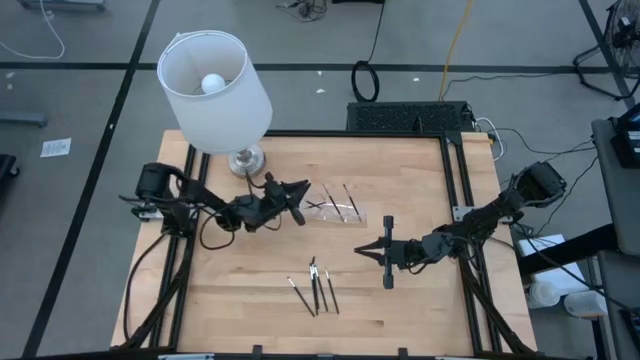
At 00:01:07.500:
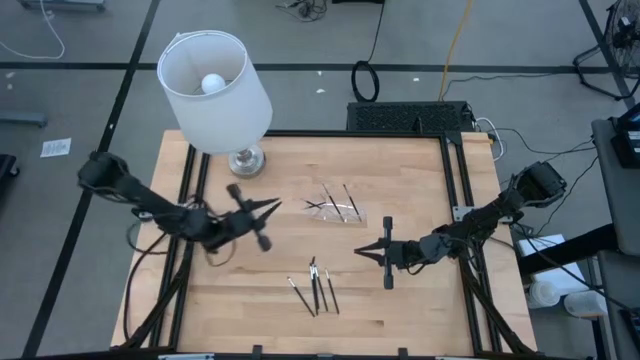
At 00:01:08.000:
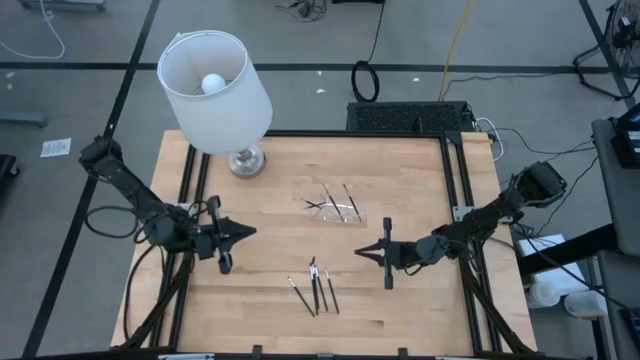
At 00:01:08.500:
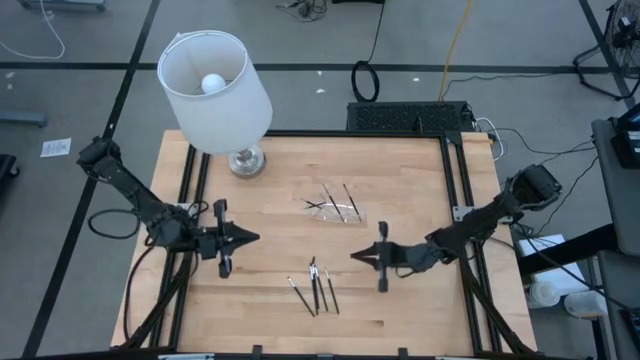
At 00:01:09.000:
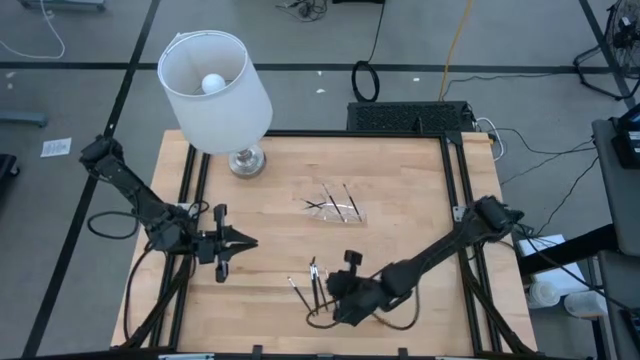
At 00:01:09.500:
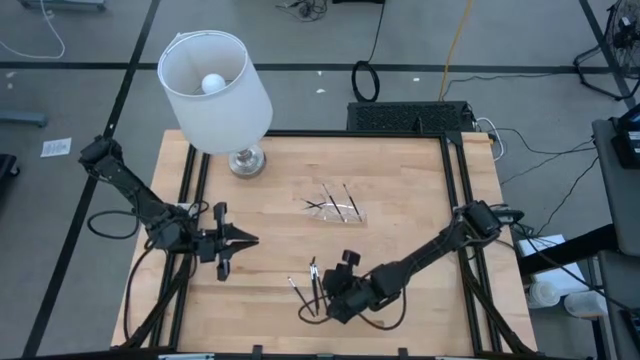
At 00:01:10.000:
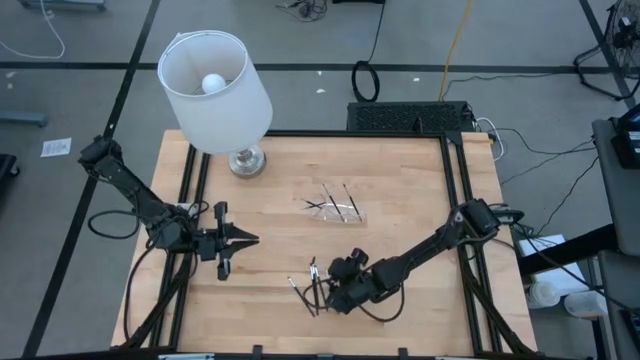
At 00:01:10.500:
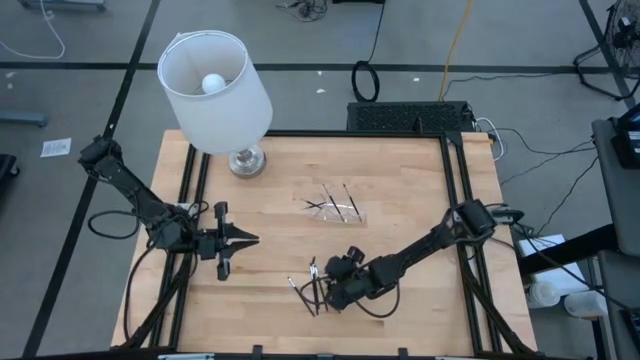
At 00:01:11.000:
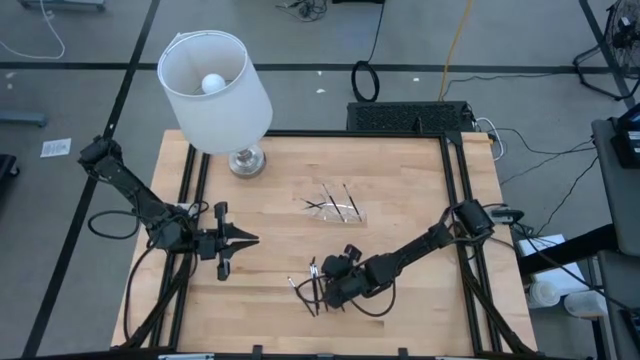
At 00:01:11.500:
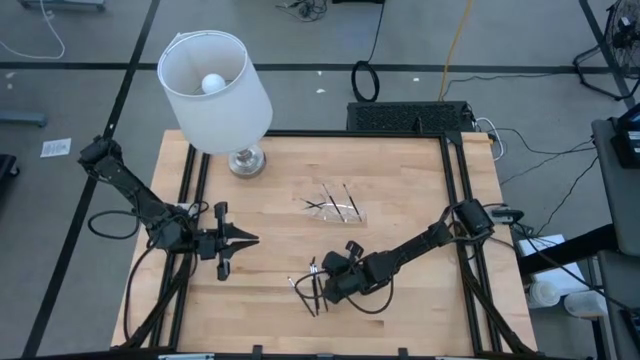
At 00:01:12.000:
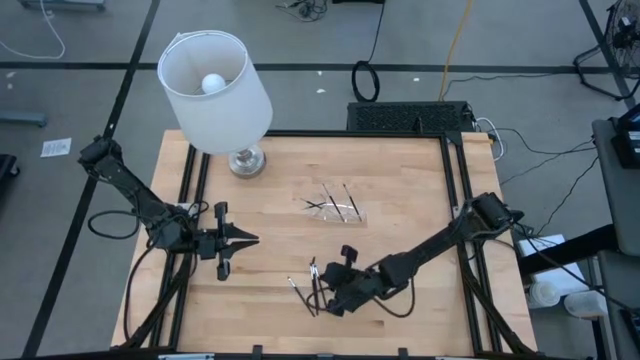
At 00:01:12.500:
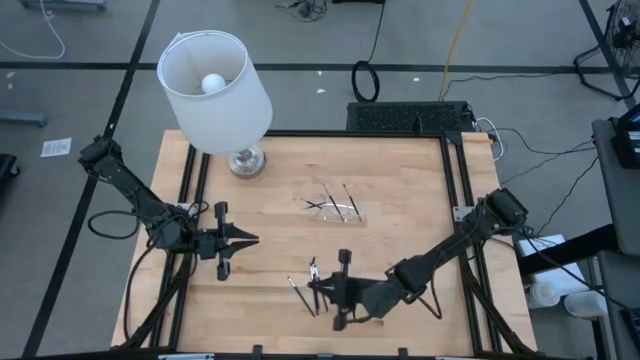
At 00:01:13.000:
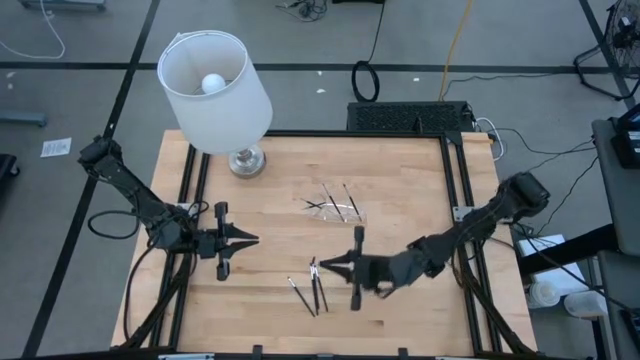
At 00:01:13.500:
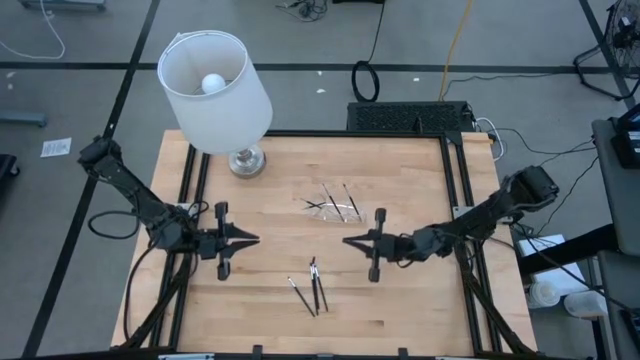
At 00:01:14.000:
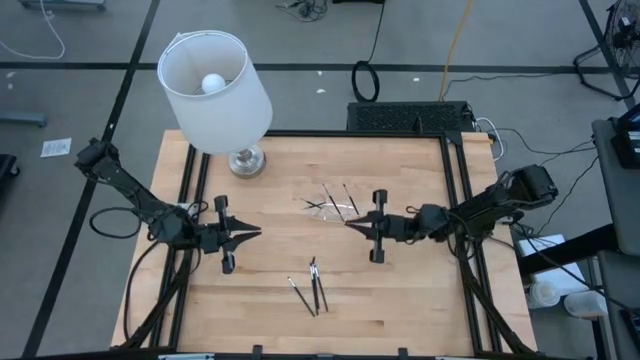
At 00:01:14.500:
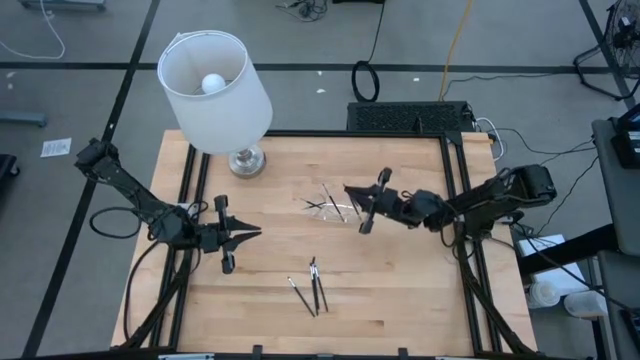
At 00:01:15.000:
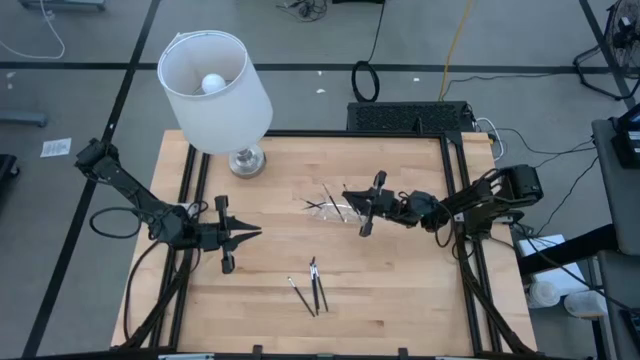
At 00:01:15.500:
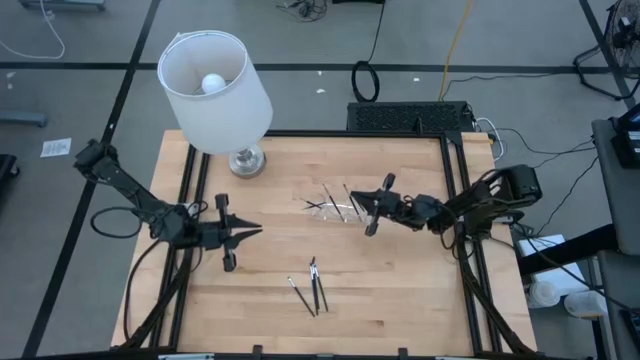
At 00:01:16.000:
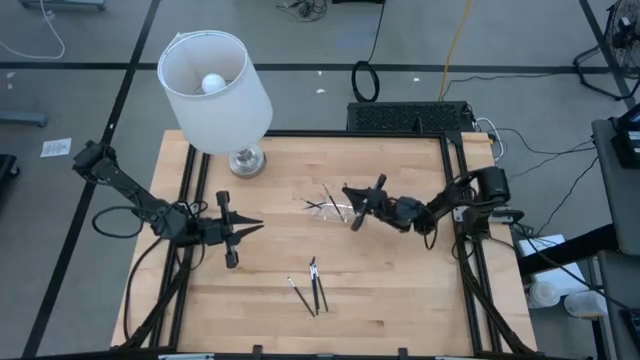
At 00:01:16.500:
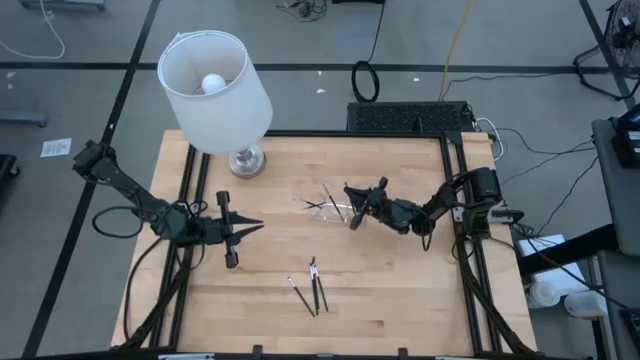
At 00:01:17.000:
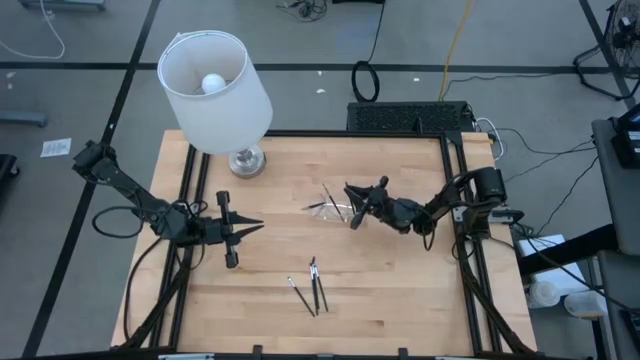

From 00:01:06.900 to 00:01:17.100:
Task: Put items in baskets/containers
Put the liner brush into the transparent organizer

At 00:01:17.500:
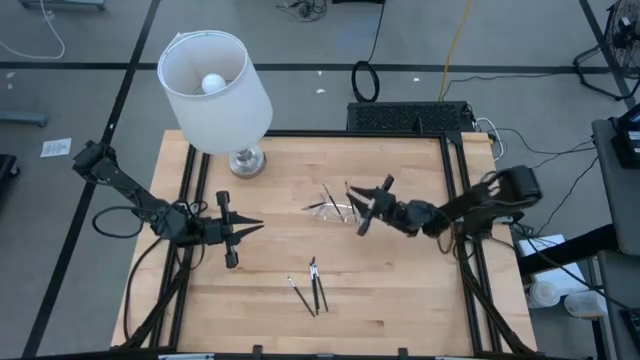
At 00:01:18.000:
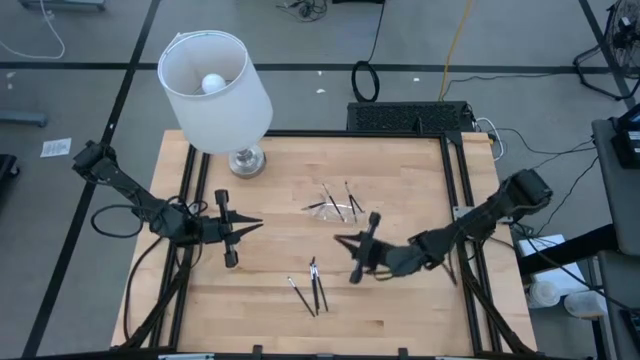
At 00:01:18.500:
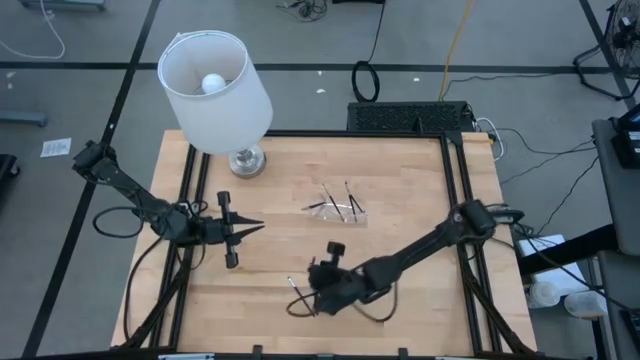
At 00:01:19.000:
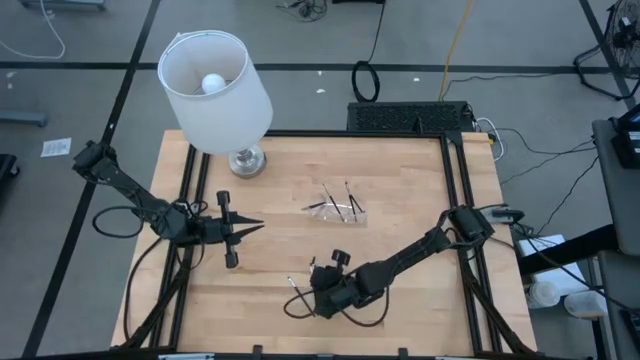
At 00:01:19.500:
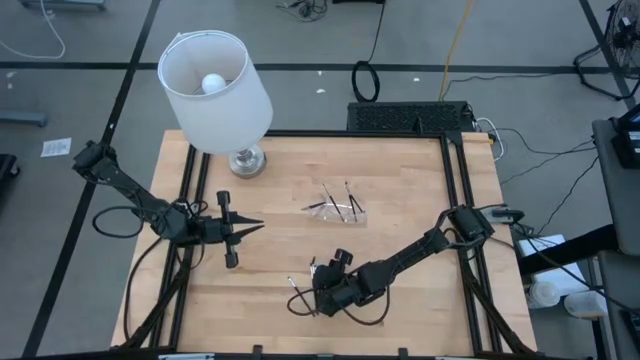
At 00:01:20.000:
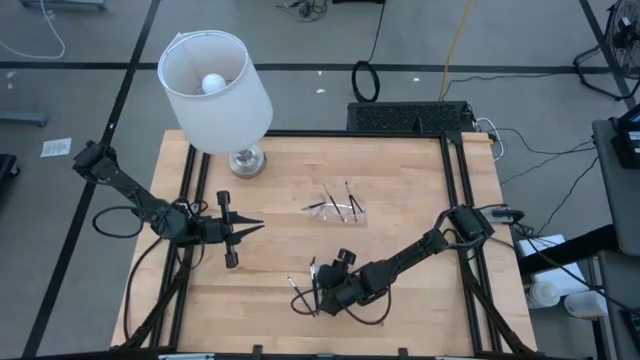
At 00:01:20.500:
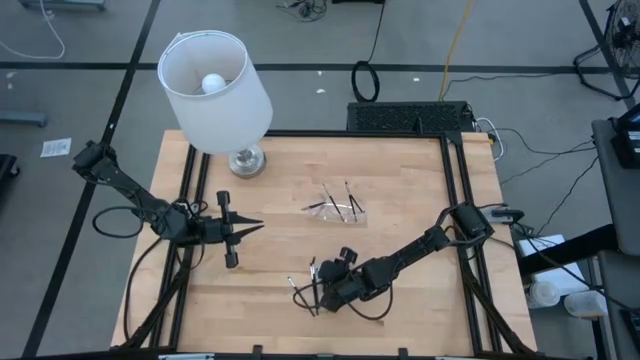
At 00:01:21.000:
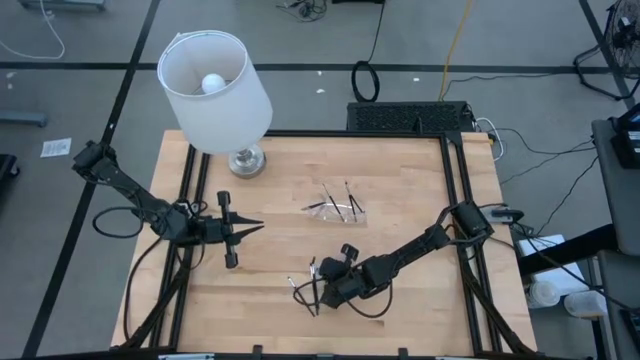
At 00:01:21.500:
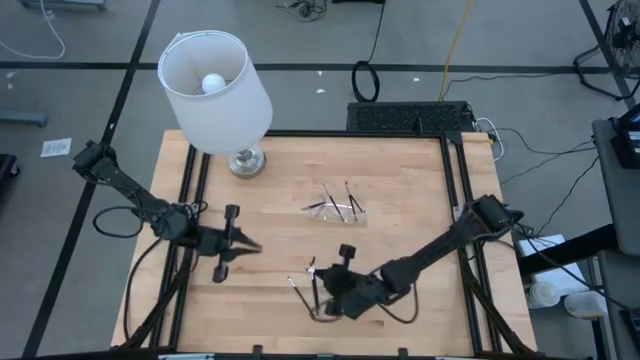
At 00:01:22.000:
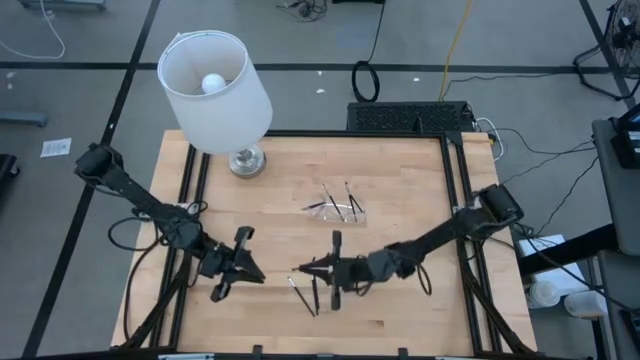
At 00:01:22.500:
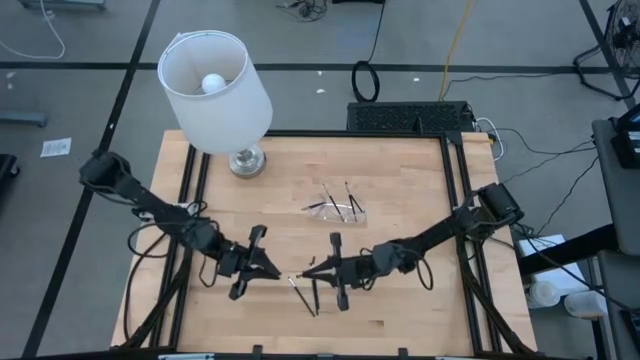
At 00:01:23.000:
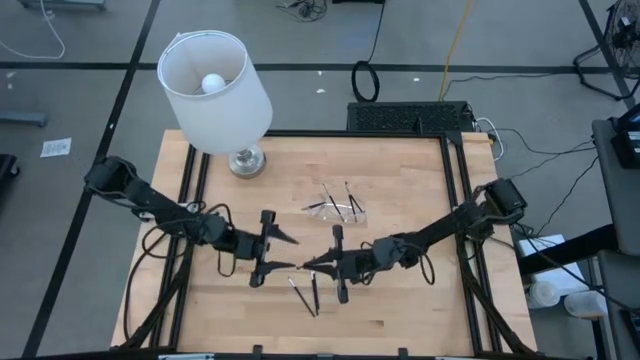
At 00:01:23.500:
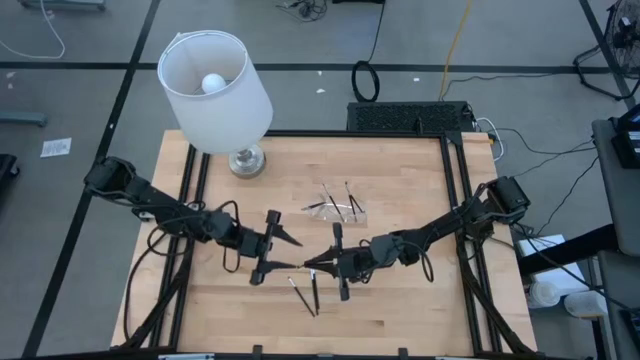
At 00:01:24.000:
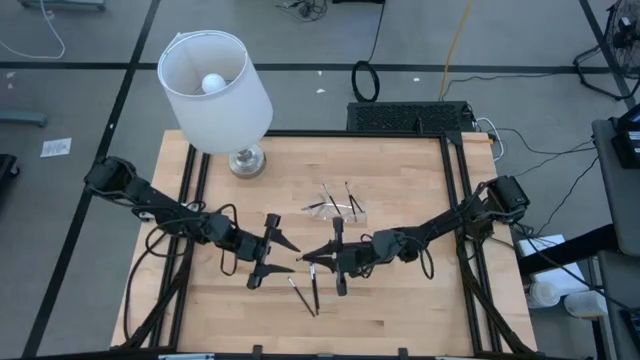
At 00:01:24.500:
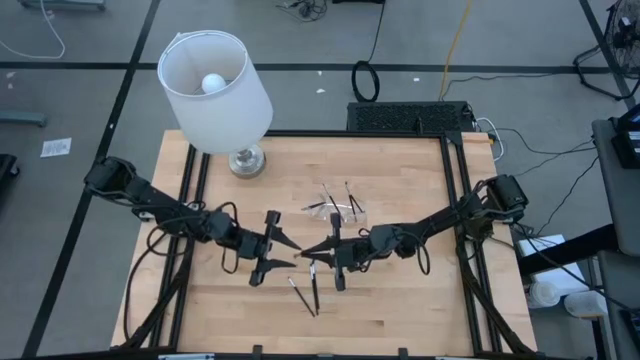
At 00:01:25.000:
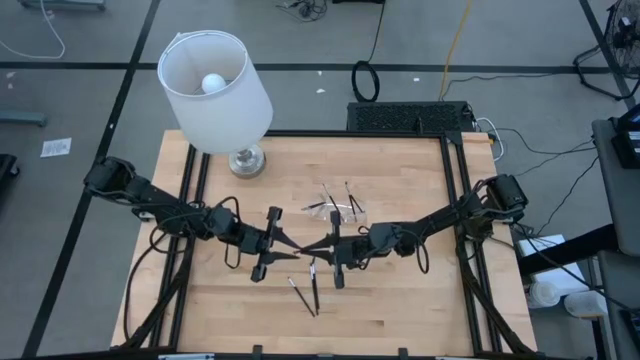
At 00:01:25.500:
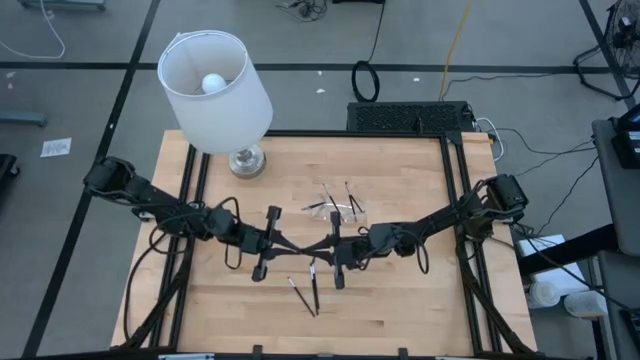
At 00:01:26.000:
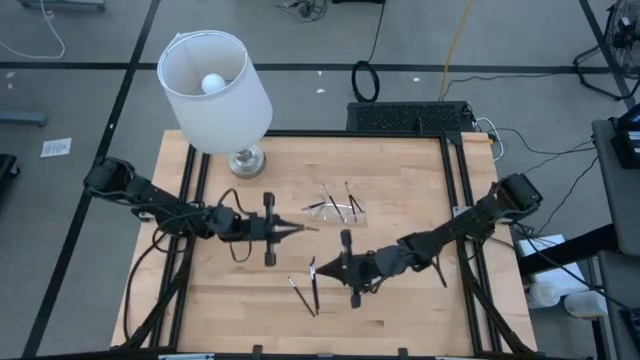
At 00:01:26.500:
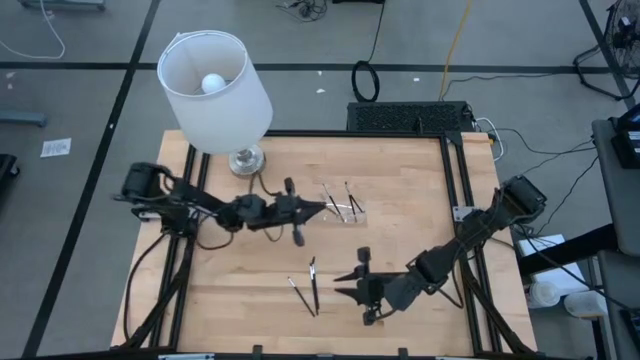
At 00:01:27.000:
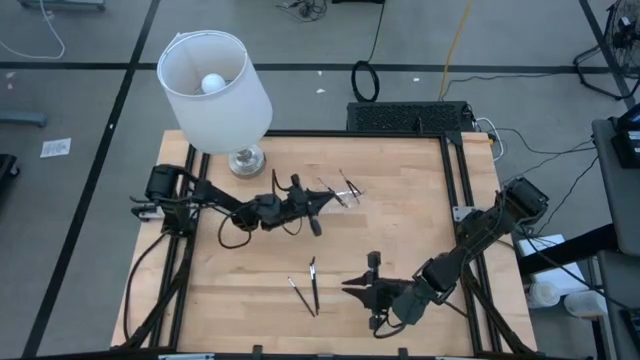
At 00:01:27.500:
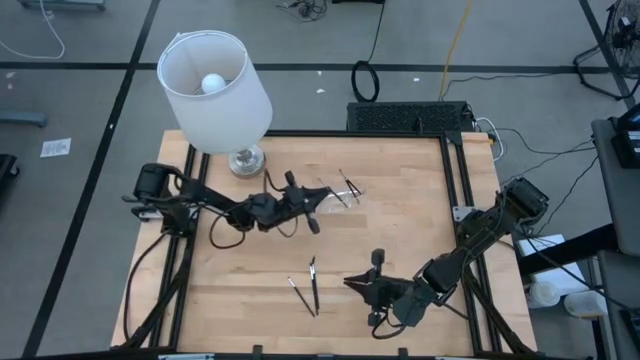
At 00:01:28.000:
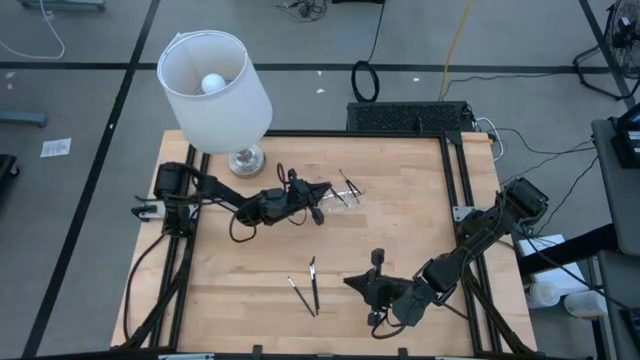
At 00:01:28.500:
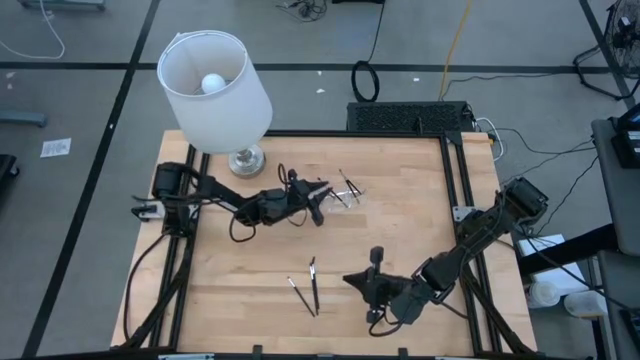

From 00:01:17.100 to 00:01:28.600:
Put the eyeshadow brush into the transparent organizer
